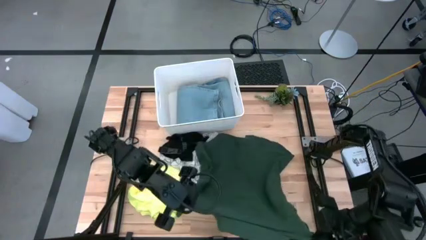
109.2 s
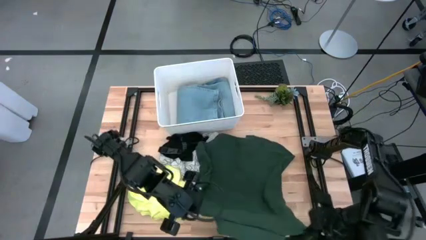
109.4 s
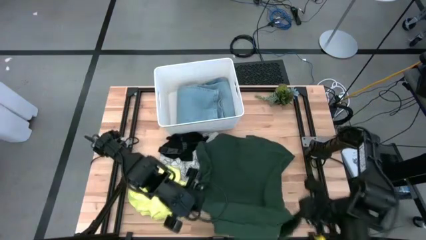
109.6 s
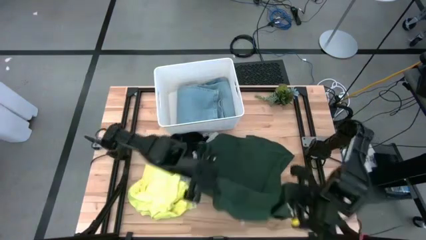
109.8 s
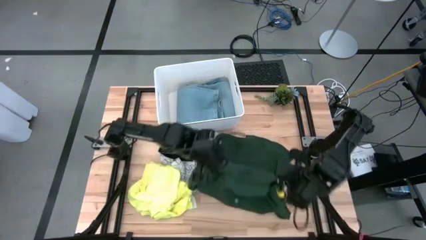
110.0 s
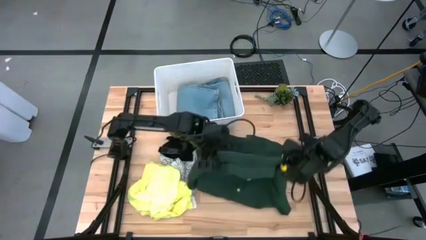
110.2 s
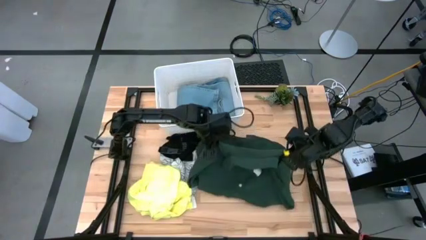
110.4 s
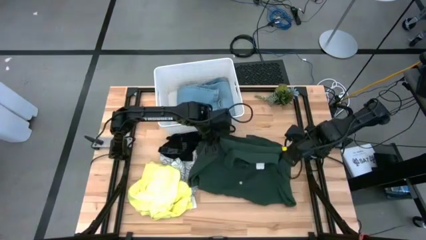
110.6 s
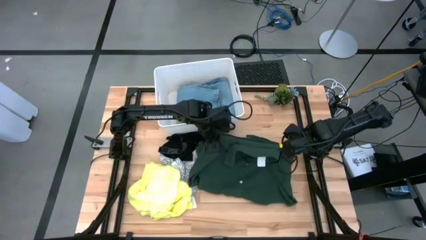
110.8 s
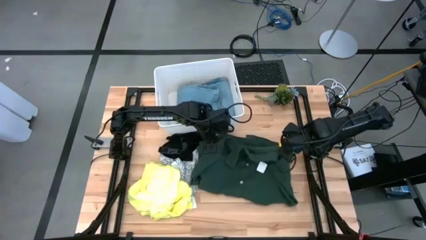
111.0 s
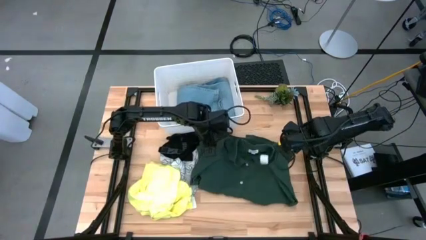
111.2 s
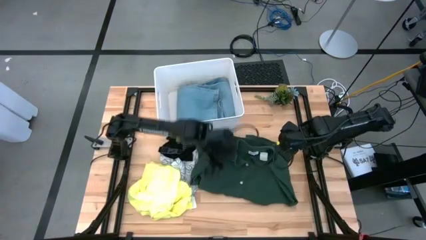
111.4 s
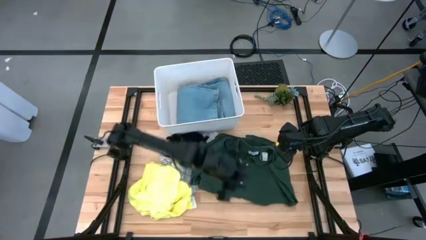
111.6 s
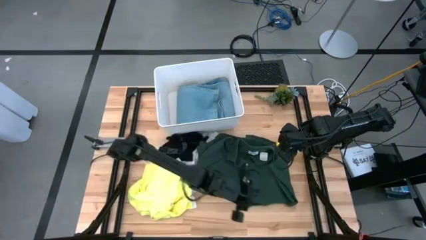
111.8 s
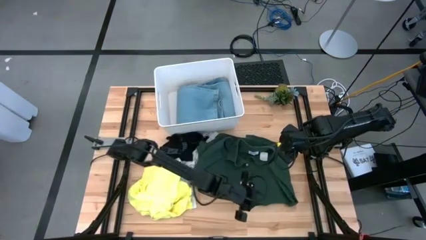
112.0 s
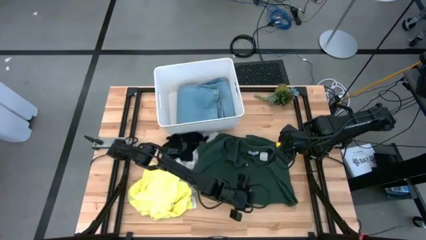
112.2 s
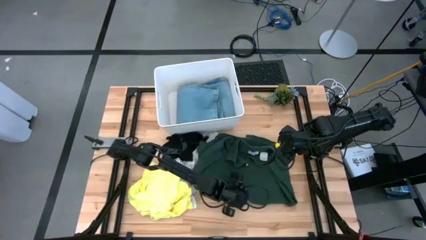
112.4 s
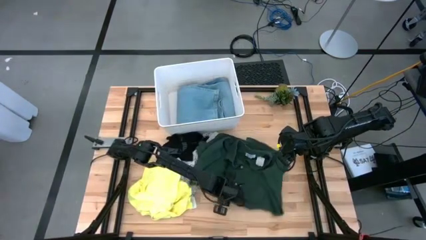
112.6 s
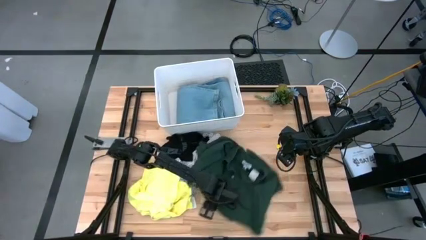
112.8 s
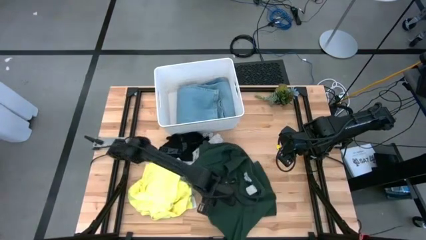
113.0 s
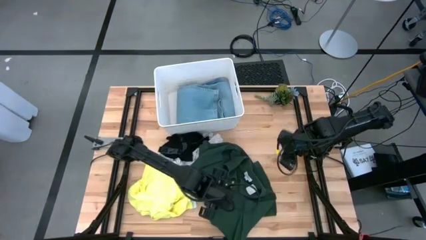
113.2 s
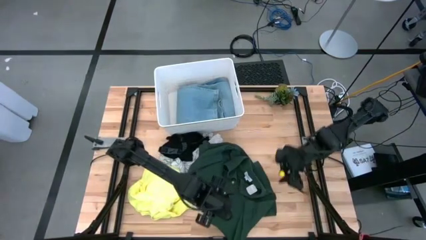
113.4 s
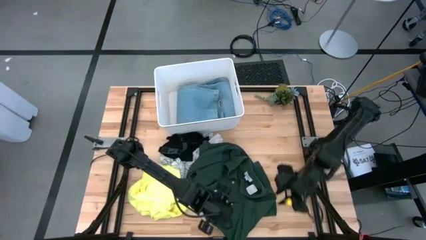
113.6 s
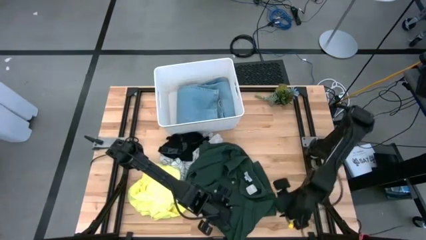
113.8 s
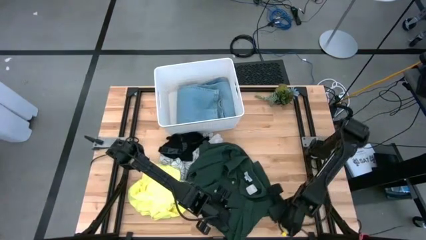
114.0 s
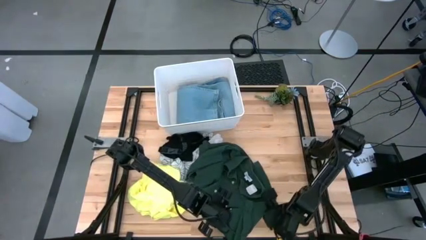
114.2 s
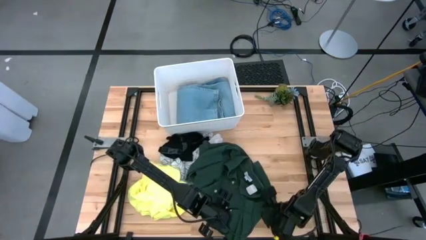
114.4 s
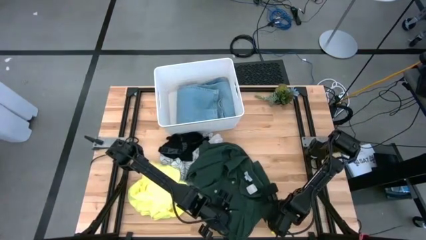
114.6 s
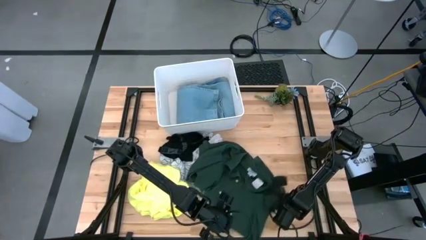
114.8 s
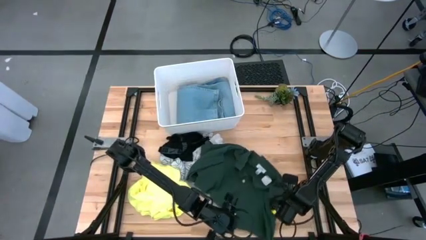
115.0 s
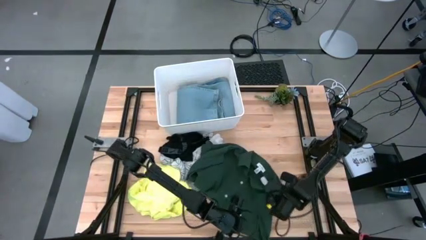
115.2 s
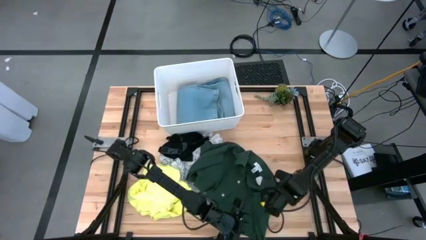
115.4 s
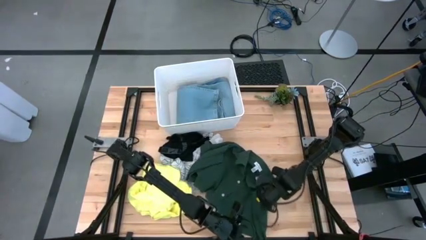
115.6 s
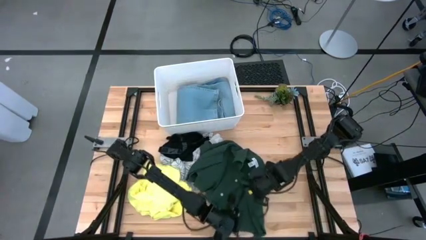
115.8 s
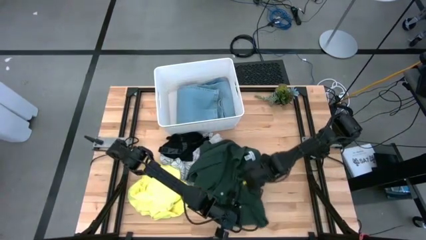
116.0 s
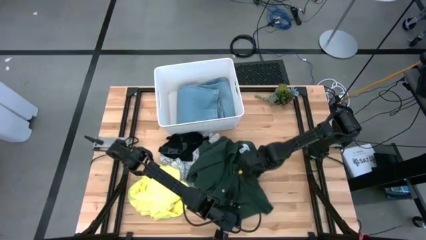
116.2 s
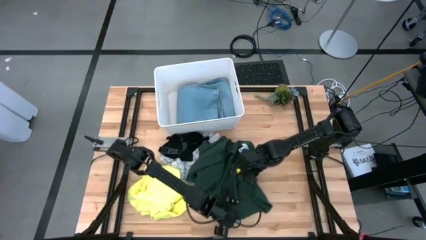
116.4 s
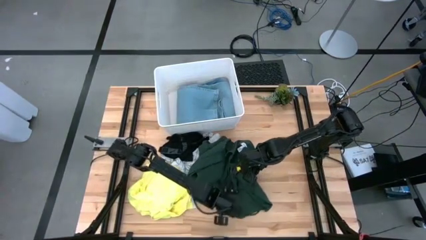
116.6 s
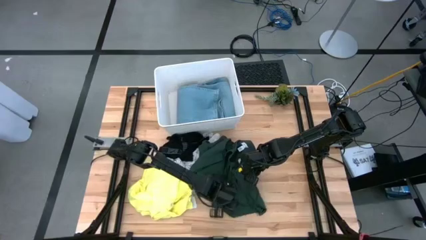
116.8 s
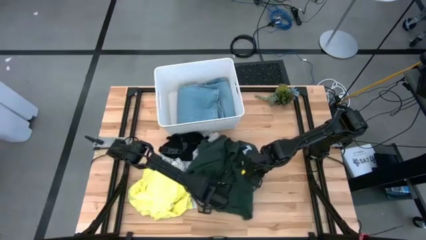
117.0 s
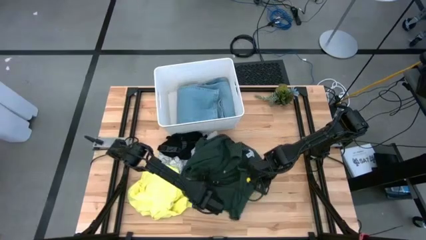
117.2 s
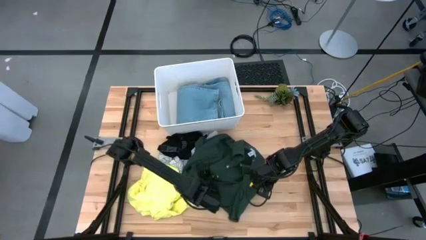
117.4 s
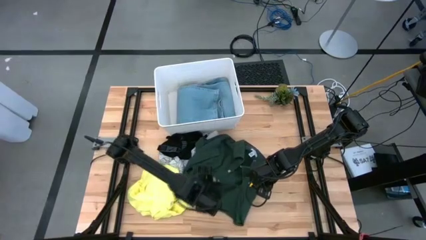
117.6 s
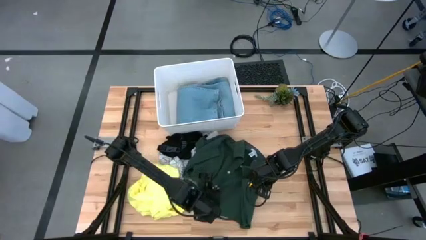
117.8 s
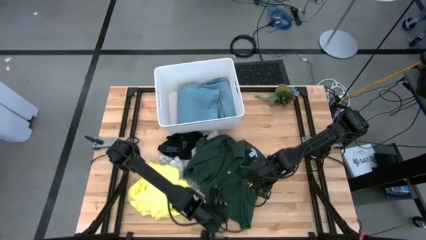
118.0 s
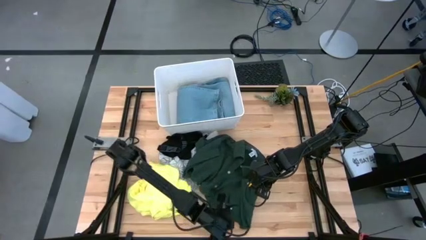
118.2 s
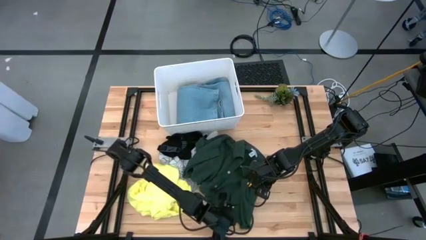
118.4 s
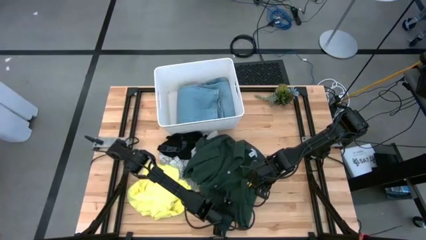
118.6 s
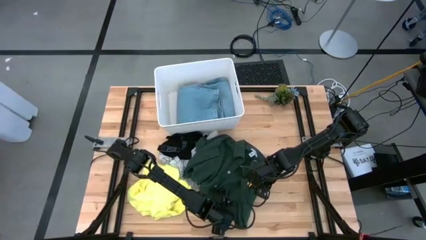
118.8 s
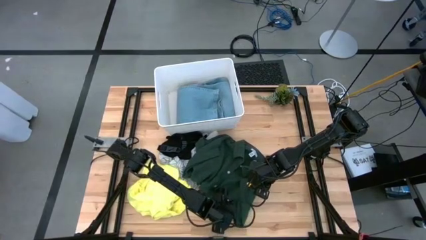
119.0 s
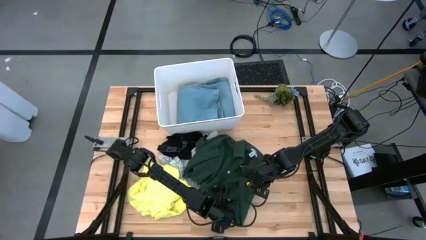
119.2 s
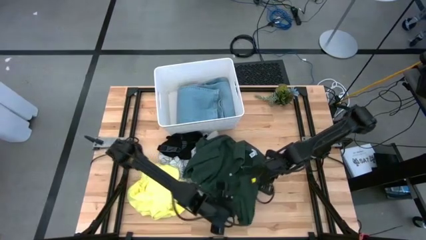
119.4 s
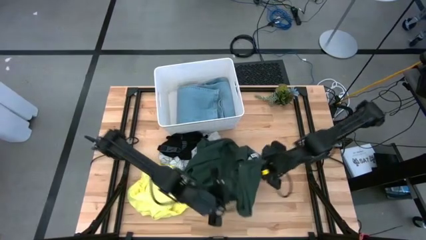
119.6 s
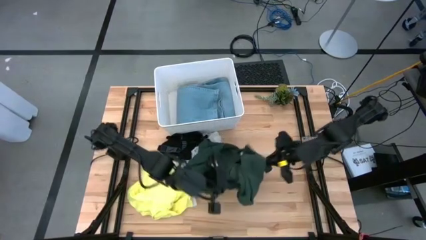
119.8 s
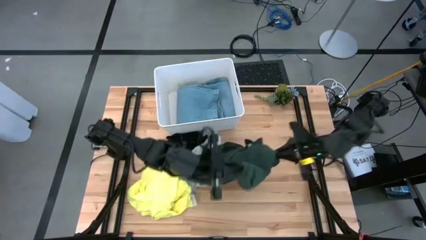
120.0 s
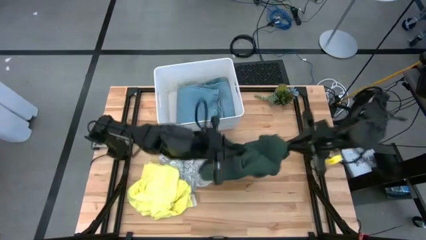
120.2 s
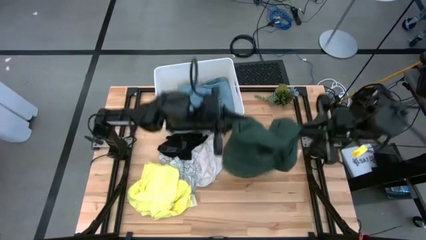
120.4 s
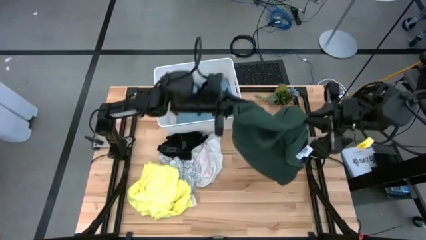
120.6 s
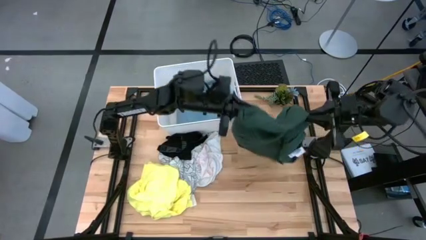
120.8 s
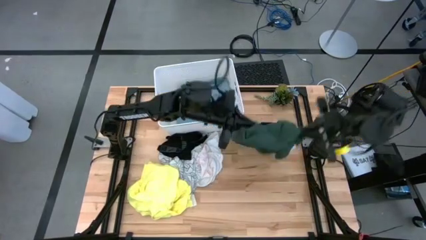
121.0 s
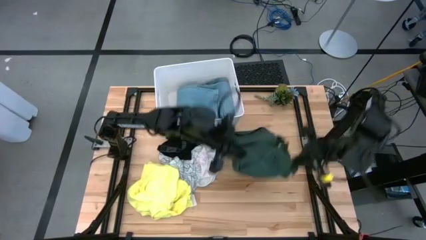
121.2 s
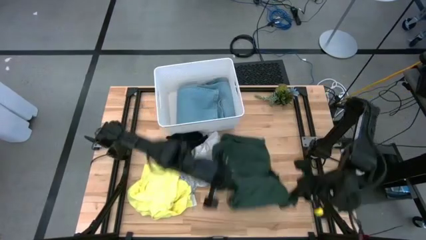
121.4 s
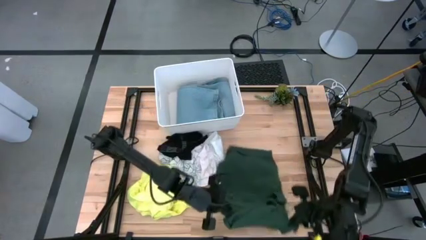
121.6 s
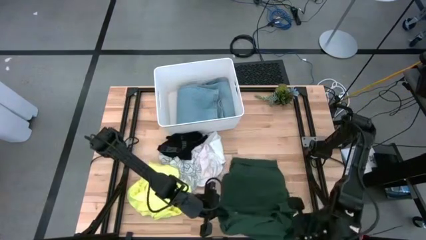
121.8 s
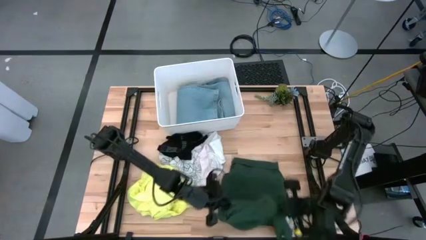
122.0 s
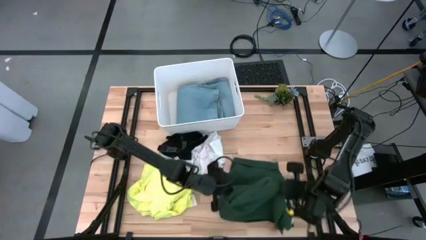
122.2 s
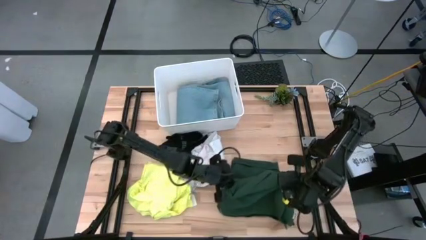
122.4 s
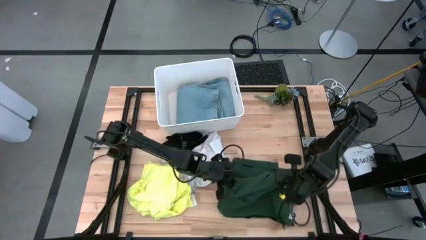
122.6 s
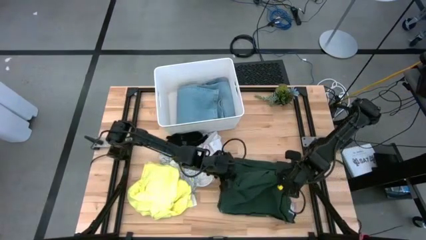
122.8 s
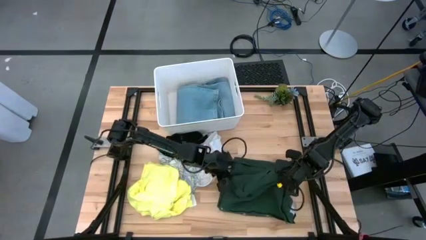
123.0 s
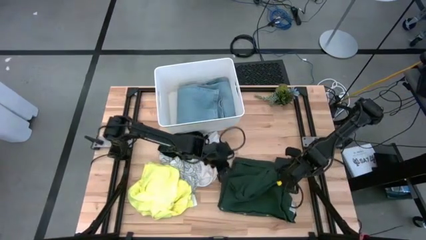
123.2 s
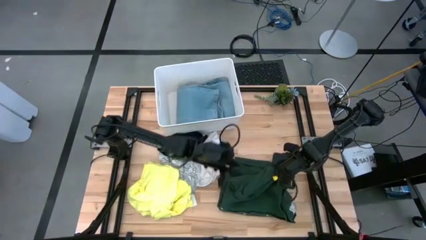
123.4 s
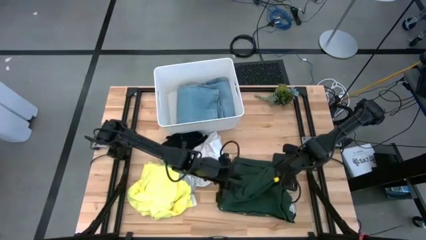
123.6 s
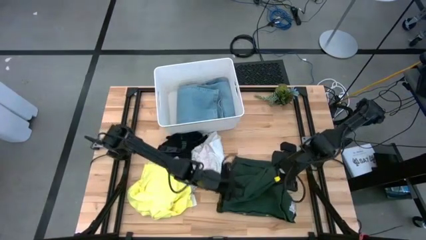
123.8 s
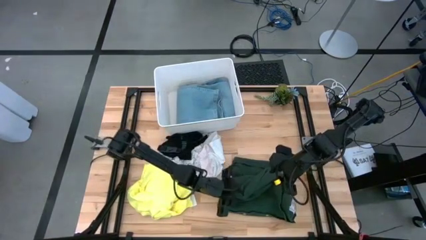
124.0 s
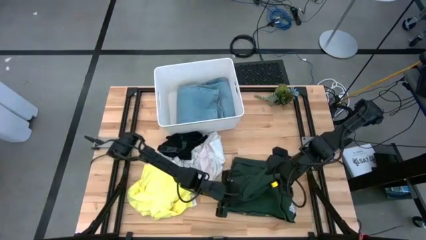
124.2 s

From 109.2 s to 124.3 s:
Task: Fold laundry
Fold the green polo shirt

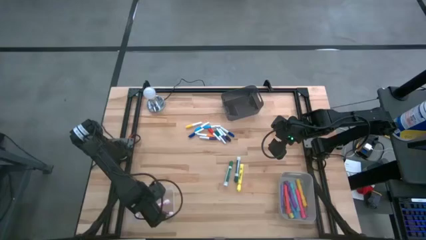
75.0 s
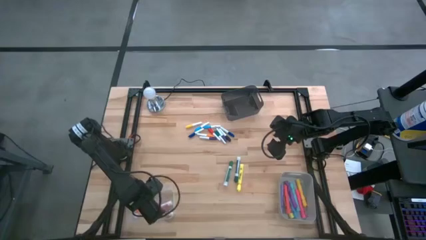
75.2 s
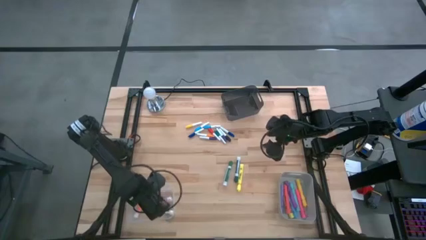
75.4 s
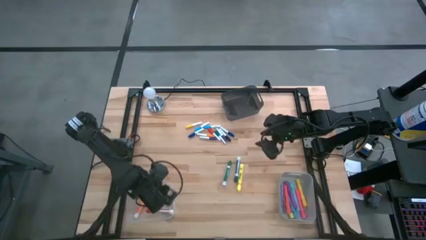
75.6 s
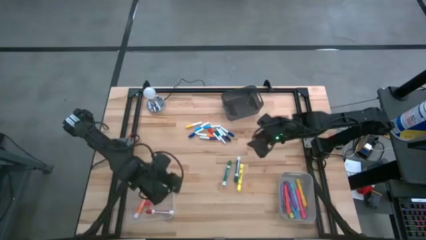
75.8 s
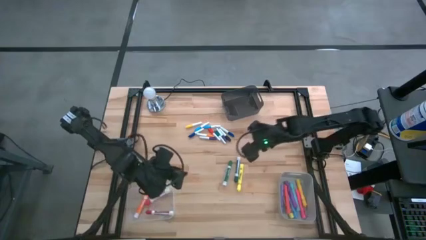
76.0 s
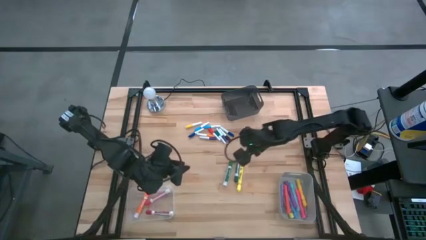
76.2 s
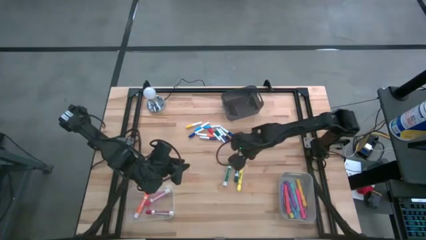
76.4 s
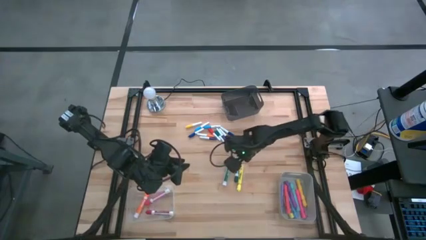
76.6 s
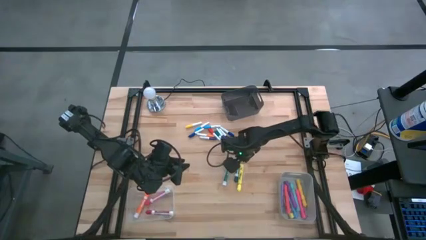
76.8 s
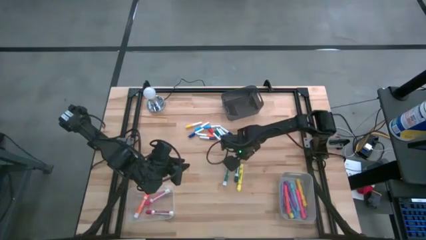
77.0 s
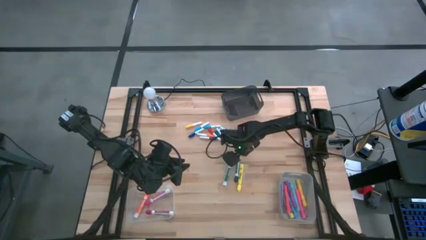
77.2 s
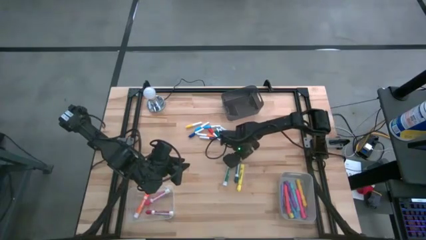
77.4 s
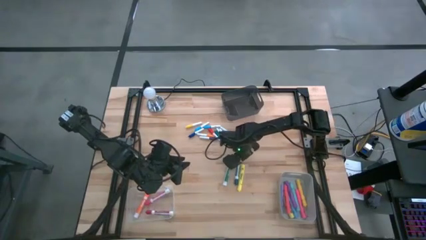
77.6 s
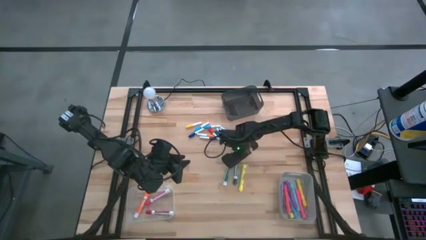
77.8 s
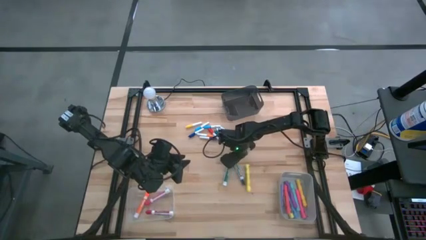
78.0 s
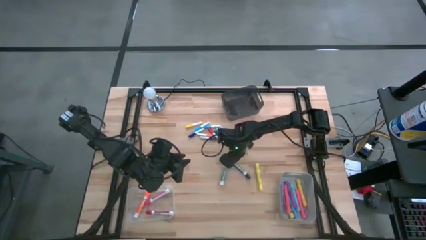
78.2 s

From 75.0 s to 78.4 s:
Task: Pick & Place Markers
Put the right green marker pen into the transparent bin
